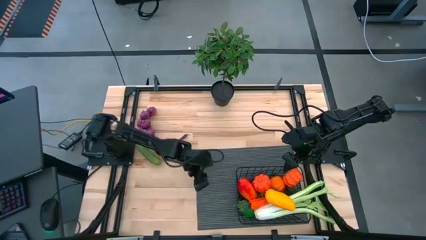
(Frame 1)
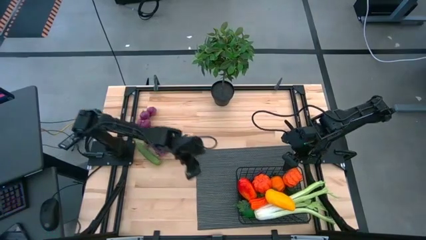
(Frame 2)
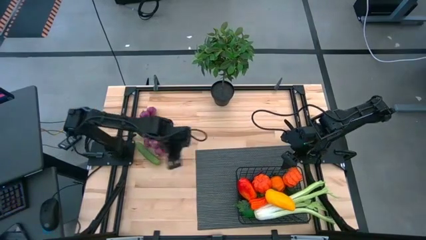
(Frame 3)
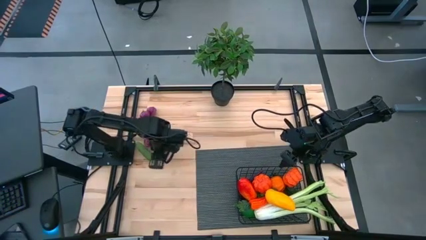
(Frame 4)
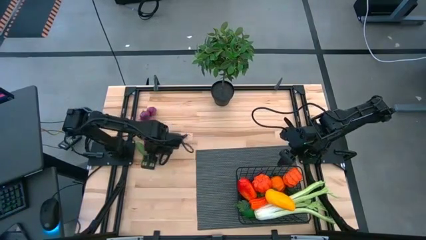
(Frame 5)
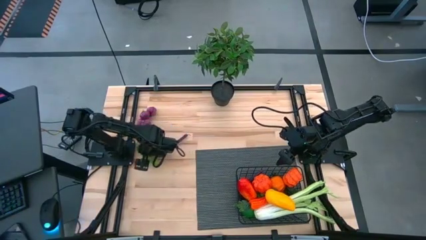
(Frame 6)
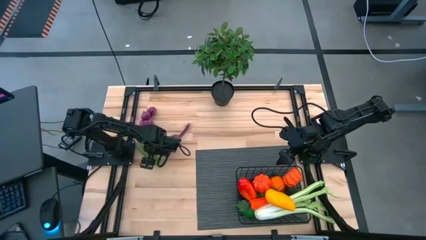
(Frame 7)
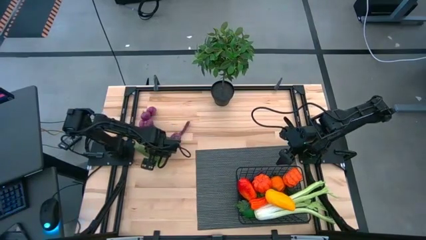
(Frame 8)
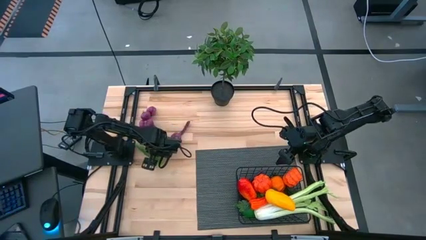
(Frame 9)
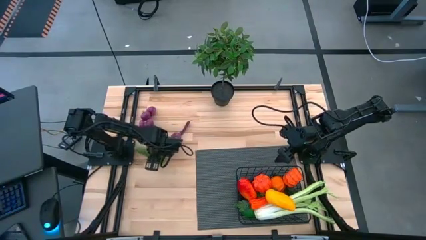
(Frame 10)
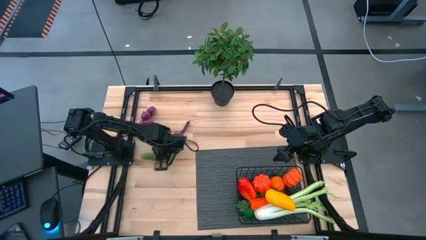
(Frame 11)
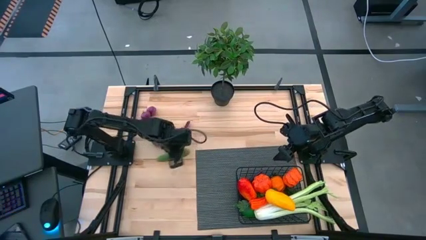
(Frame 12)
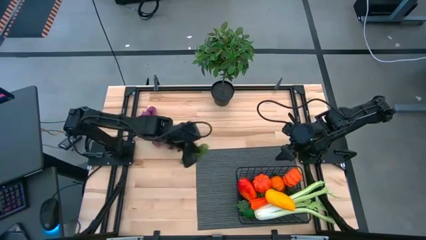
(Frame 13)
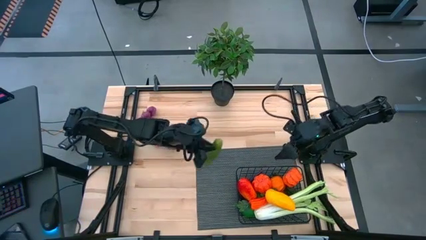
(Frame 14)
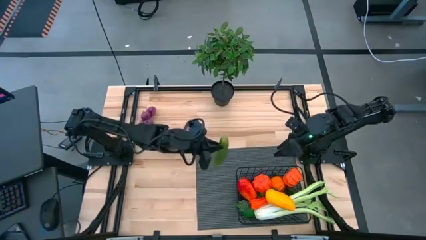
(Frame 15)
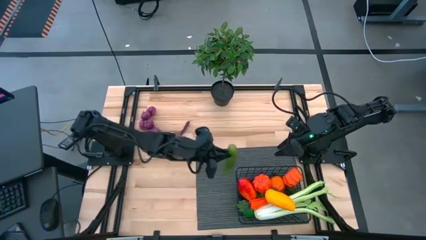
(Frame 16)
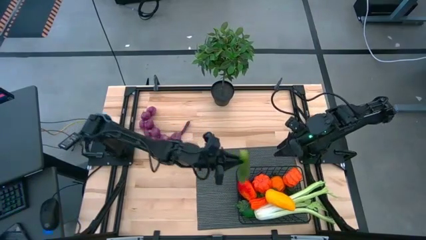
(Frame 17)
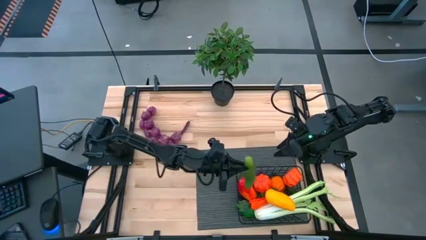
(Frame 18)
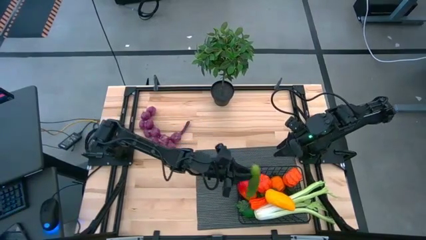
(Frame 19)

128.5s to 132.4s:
Task: Build produce basket
Put the green cucumber into the black wire basket

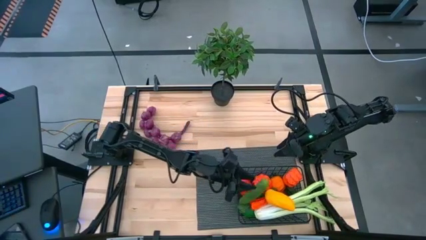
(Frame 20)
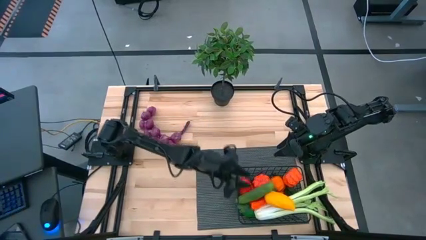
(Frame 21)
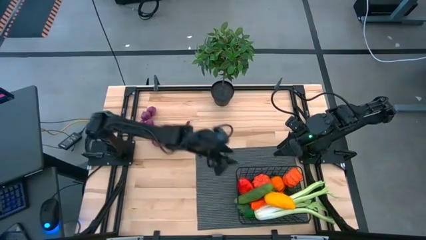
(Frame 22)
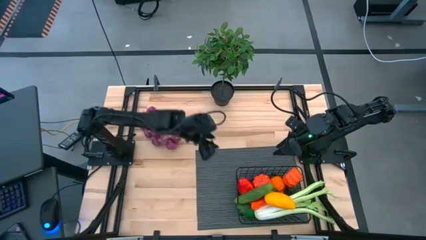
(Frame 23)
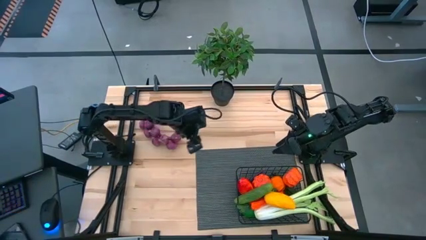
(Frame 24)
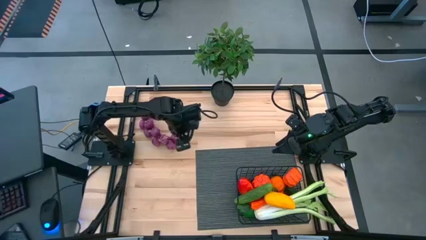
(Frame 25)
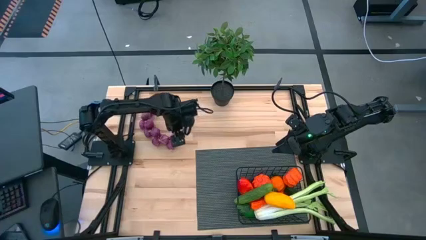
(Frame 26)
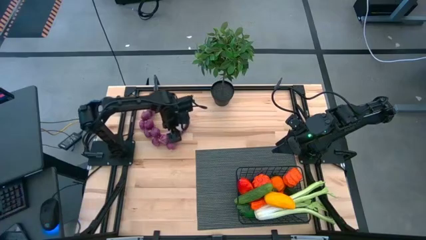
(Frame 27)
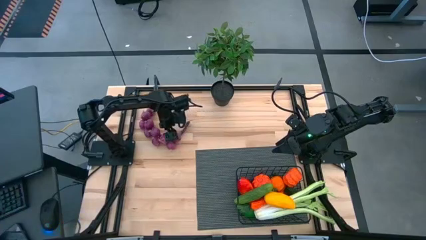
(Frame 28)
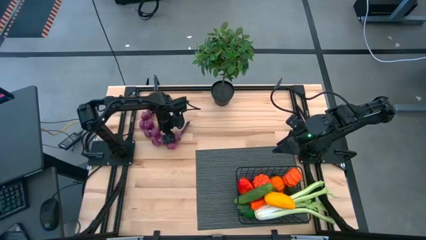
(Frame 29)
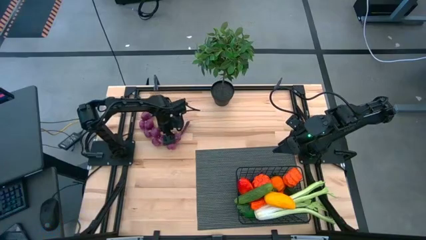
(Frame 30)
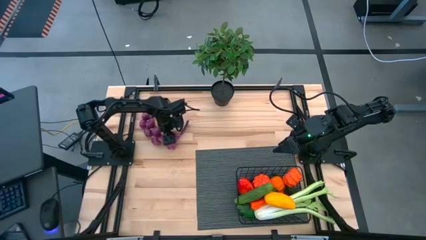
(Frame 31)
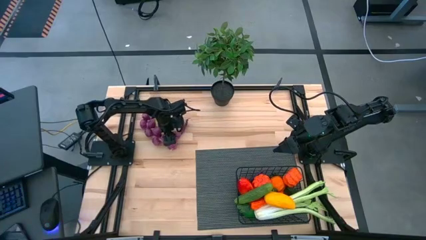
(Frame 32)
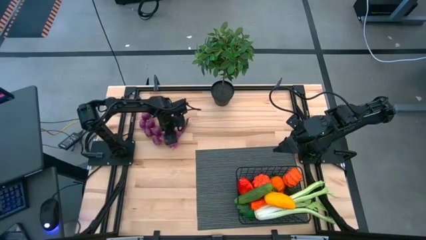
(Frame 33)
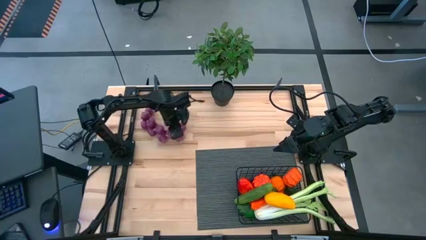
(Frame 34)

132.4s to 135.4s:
Put the purple garlic into the black wire basket

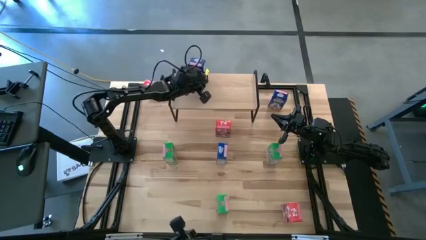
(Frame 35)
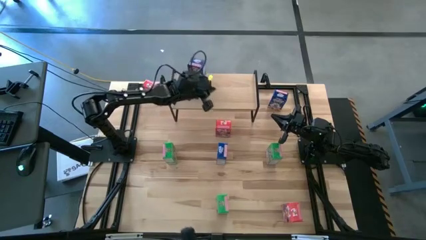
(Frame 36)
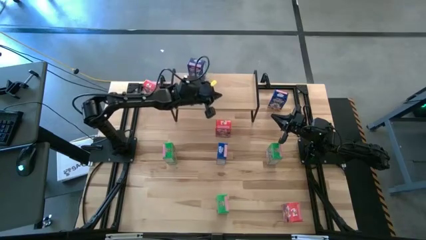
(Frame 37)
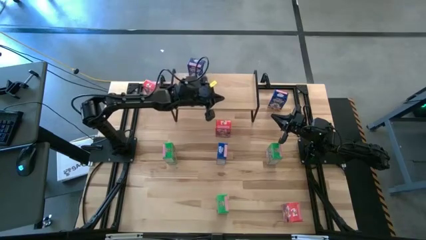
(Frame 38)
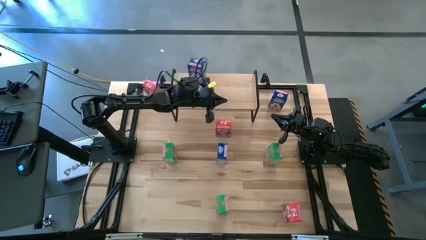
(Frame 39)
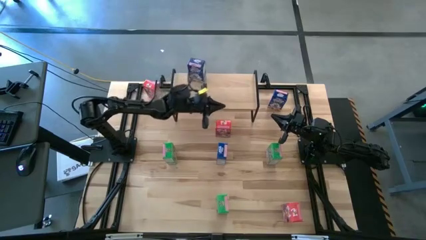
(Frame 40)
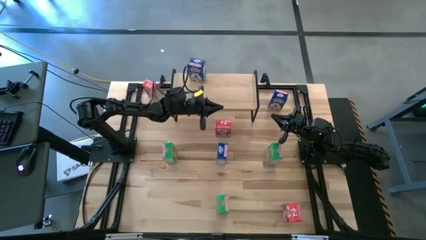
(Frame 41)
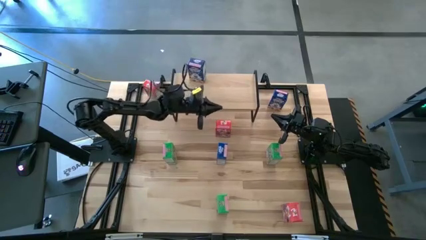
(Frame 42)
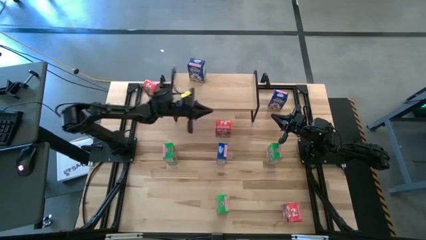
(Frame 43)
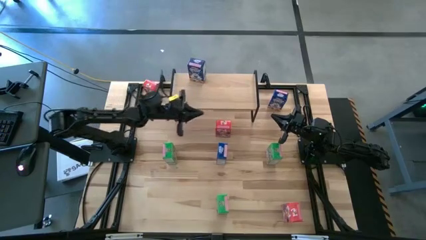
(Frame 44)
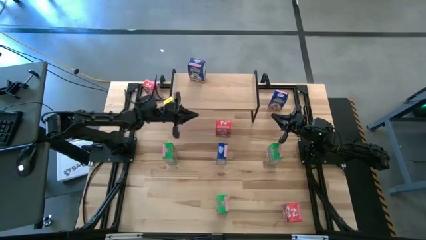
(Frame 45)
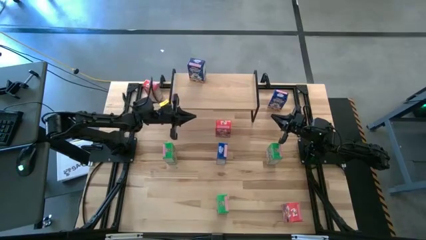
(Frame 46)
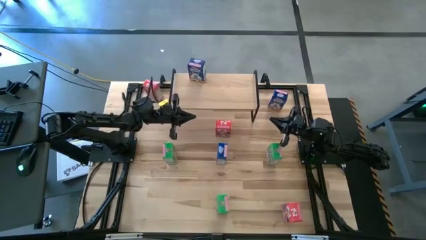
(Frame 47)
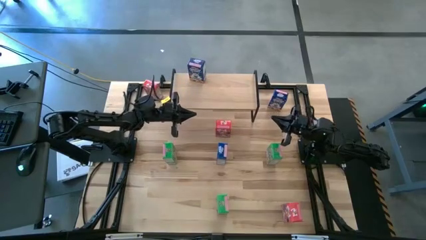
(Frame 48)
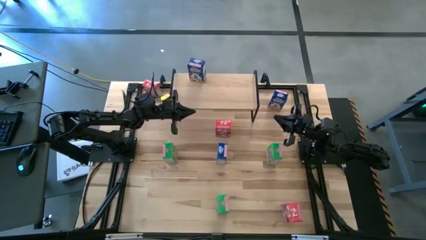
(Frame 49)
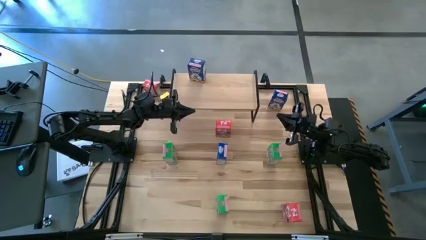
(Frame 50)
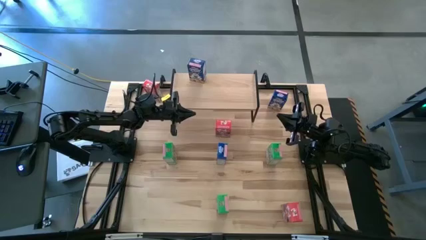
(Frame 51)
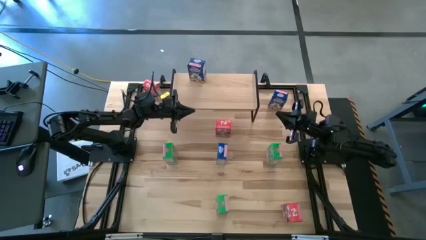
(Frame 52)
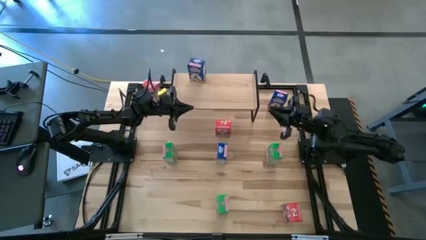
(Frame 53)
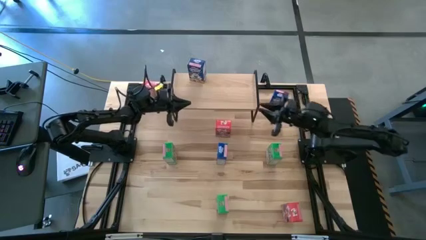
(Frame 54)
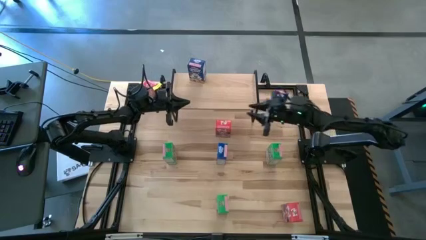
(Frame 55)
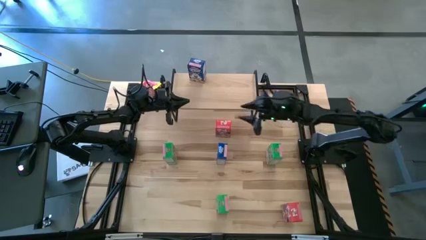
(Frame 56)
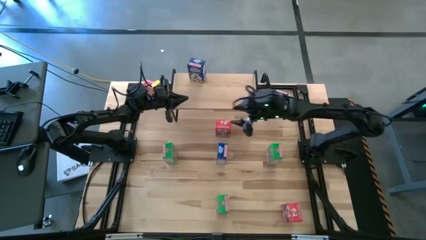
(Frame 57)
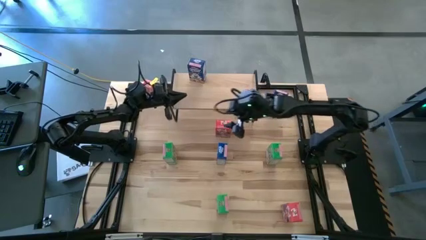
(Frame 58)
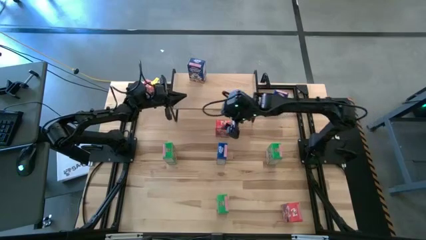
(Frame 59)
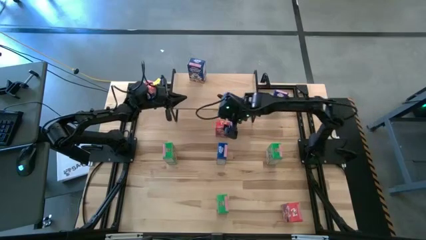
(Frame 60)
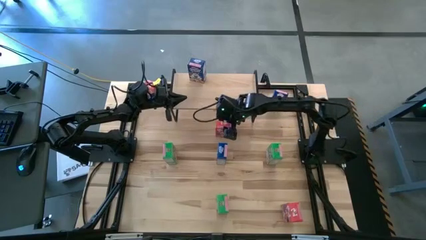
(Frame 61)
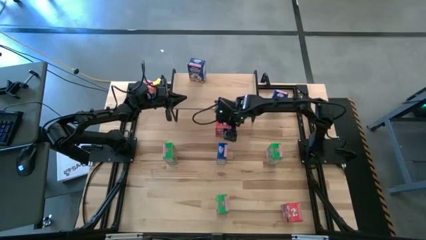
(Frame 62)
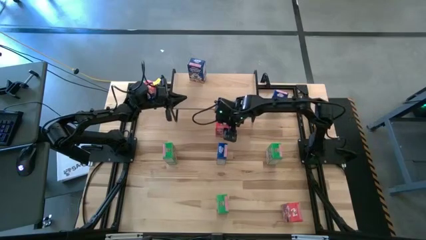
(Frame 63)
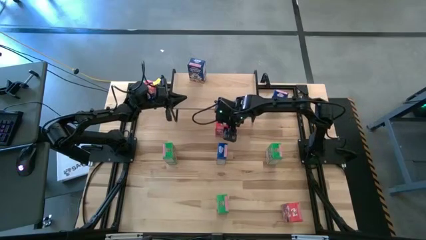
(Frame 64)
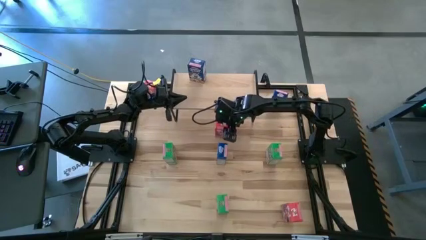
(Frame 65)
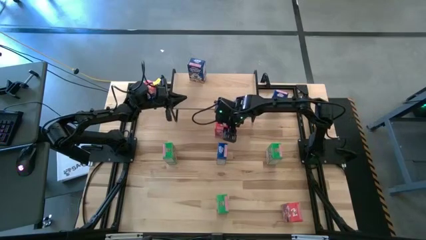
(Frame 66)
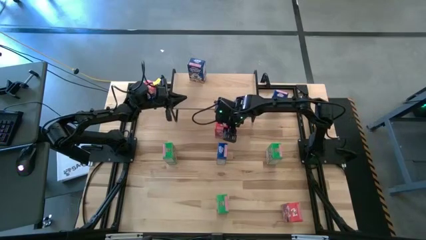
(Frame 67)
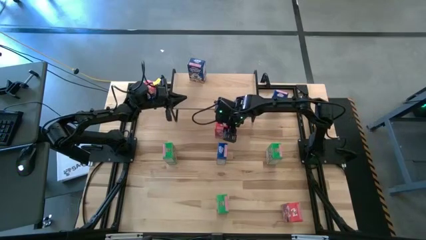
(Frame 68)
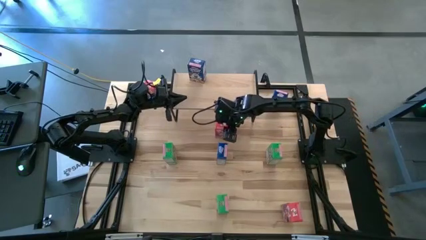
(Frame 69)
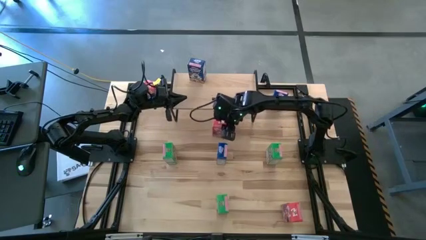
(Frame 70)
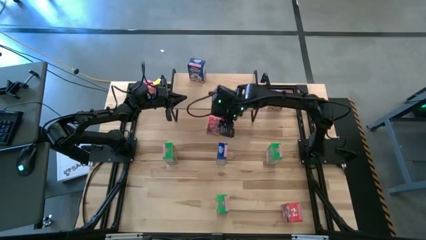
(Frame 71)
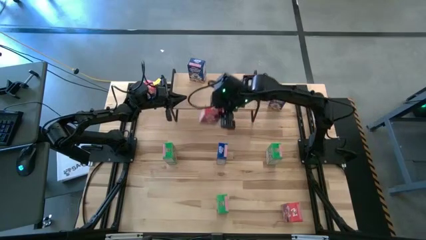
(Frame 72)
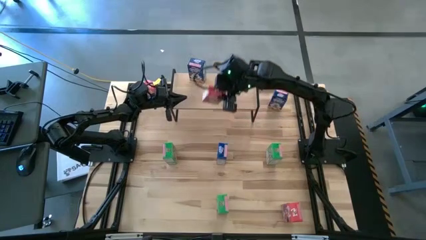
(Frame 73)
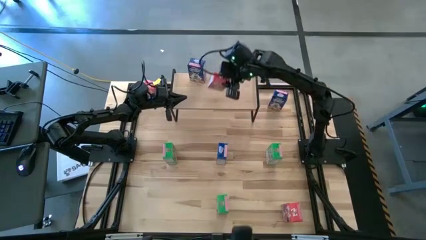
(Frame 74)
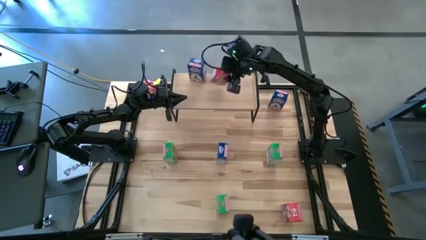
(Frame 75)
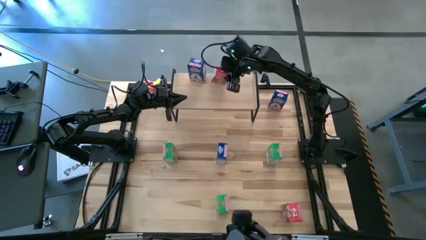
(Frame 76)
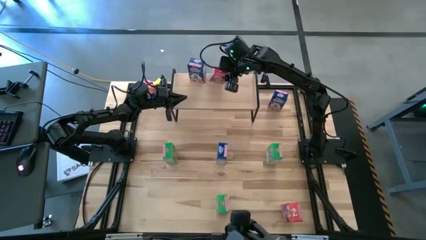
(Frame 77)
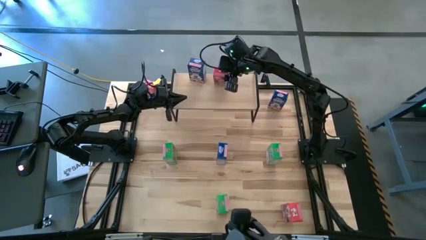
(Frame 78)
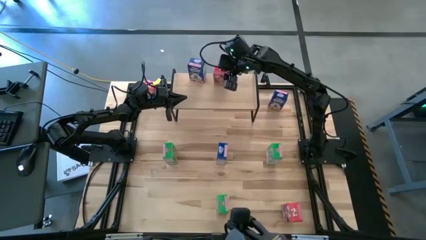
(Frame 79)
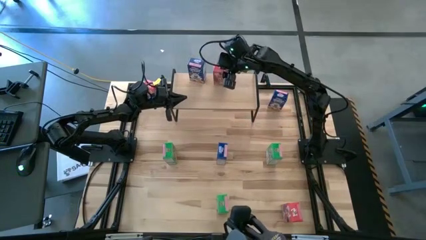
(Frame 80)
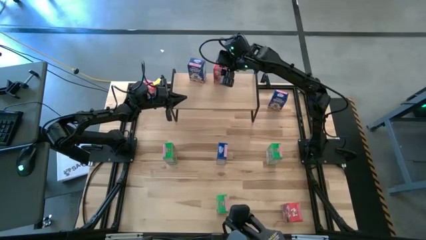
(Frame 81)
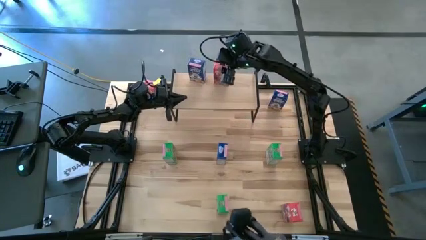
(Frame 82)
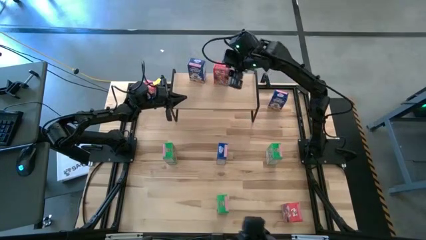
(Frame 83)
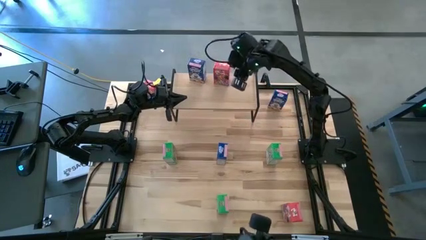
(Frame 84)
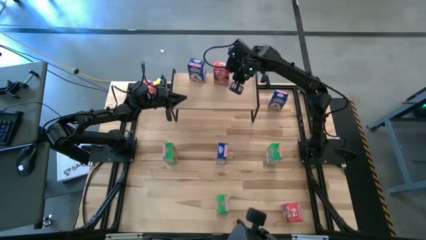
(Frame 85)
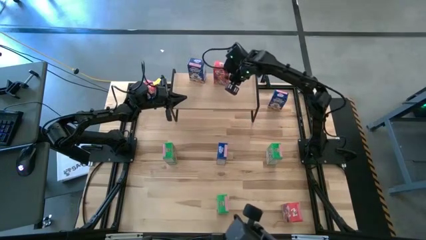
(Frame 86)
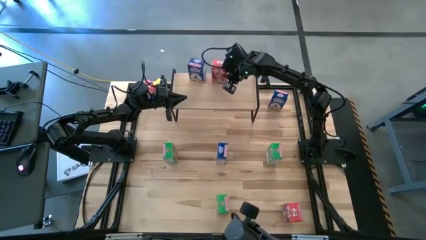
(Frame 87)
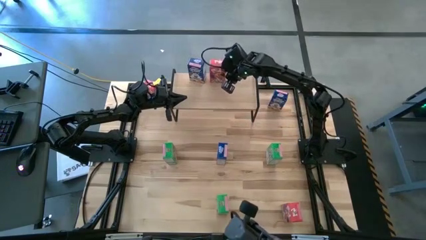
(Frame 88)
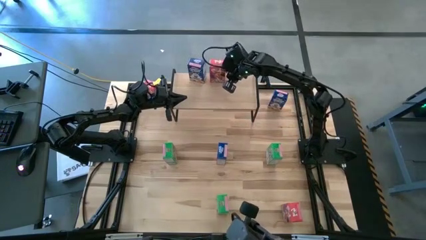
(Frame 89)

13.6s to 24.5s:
Task: Stack cereal on shelf
Put the center red cereal box on the shelf
